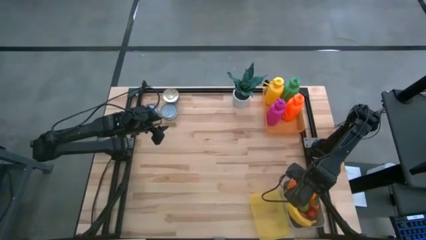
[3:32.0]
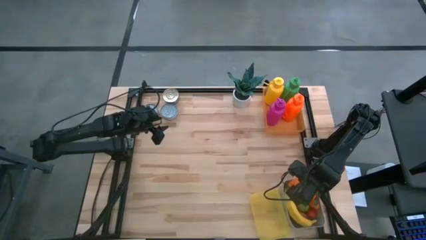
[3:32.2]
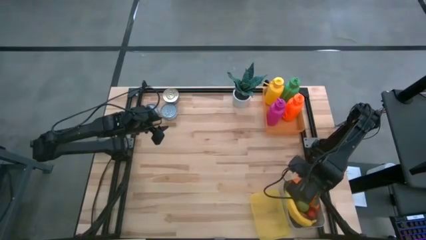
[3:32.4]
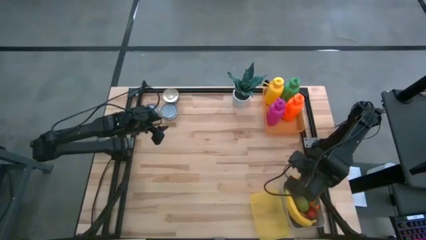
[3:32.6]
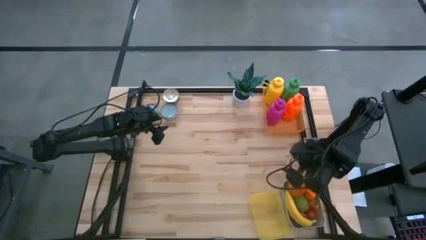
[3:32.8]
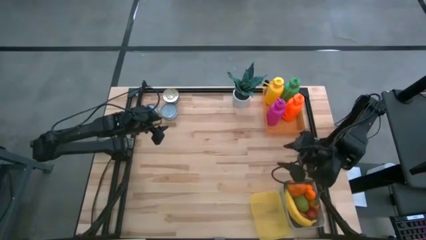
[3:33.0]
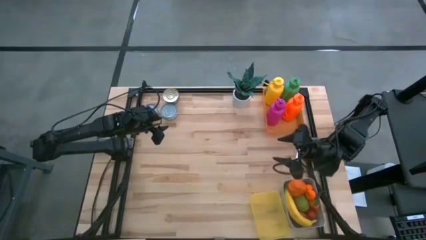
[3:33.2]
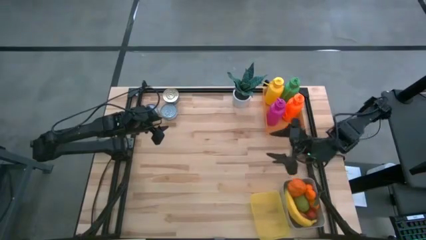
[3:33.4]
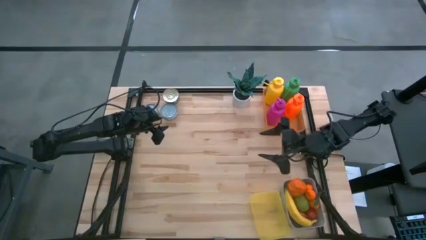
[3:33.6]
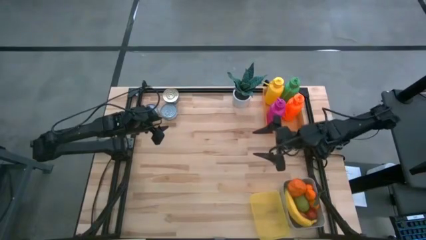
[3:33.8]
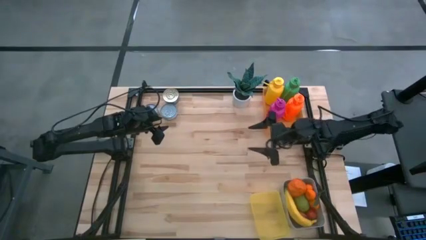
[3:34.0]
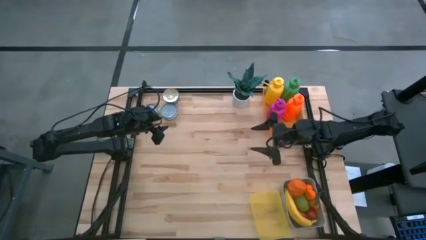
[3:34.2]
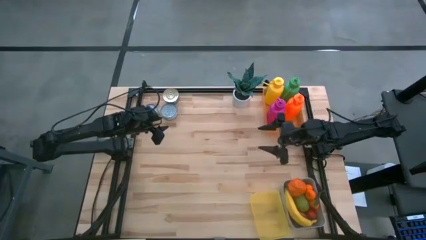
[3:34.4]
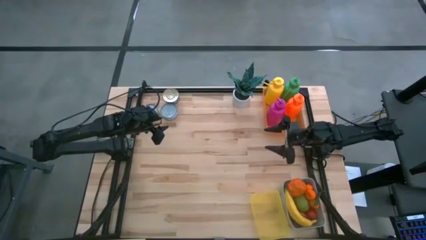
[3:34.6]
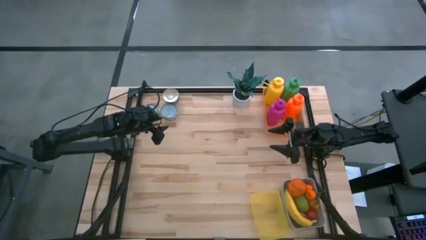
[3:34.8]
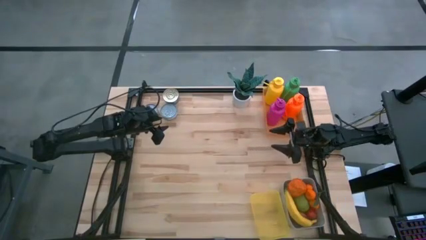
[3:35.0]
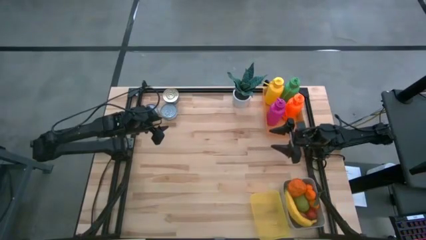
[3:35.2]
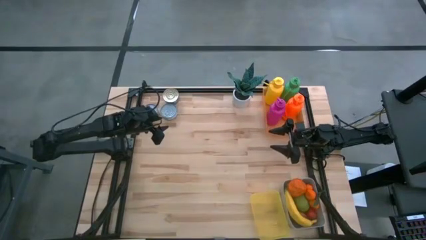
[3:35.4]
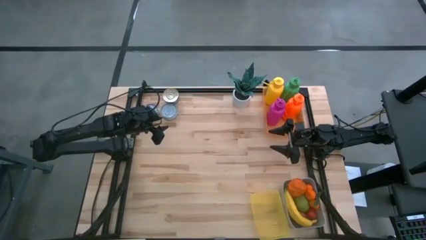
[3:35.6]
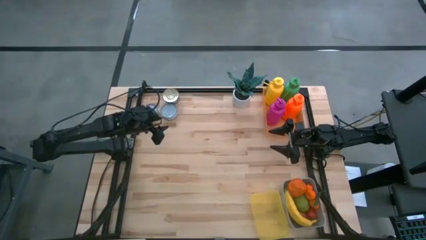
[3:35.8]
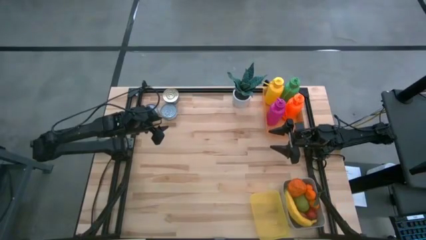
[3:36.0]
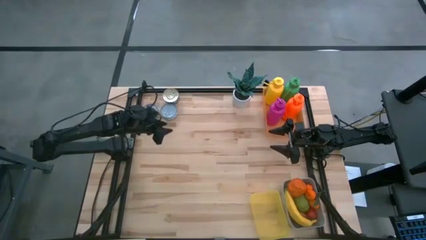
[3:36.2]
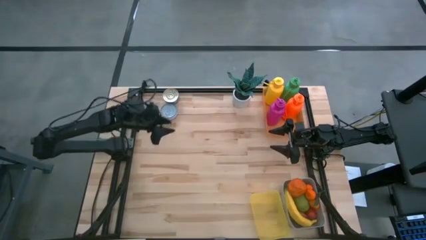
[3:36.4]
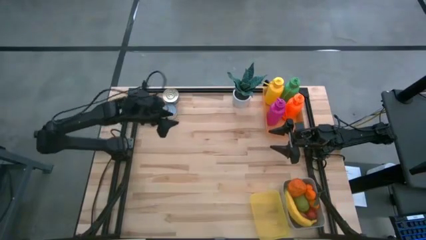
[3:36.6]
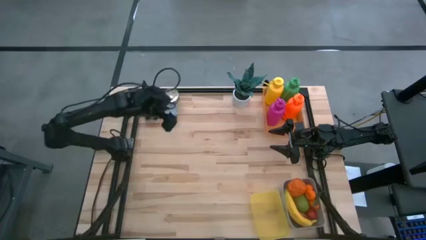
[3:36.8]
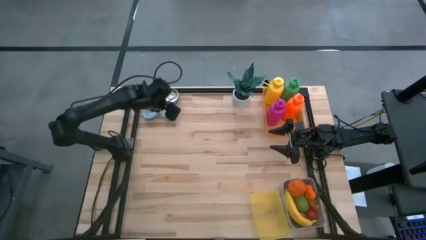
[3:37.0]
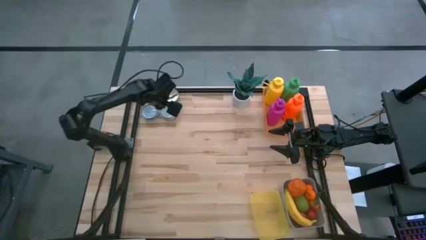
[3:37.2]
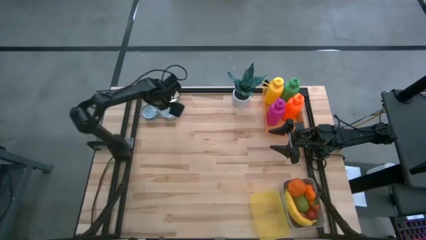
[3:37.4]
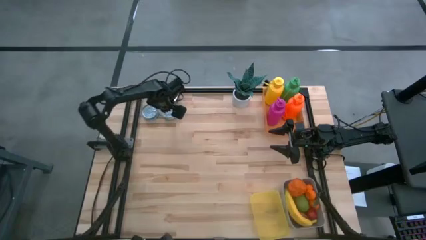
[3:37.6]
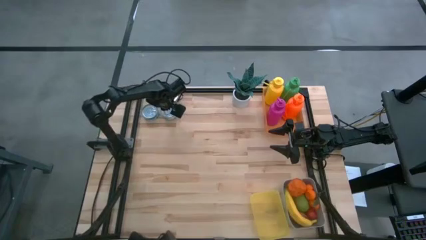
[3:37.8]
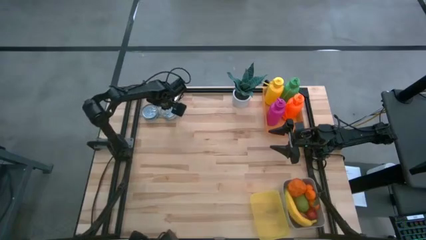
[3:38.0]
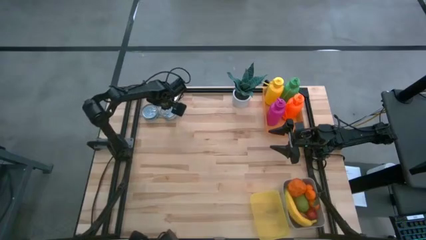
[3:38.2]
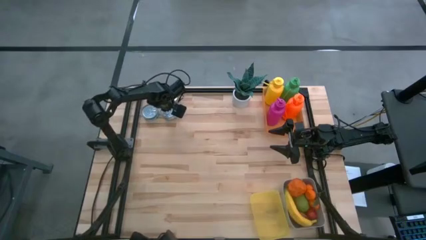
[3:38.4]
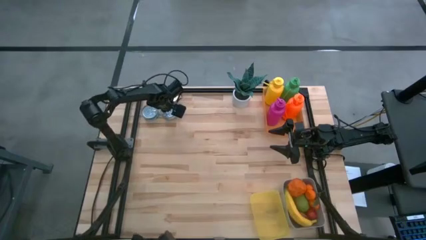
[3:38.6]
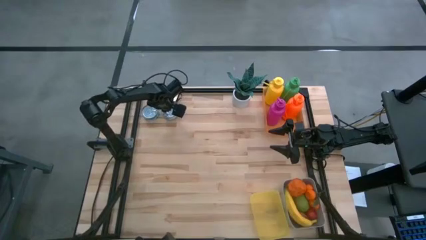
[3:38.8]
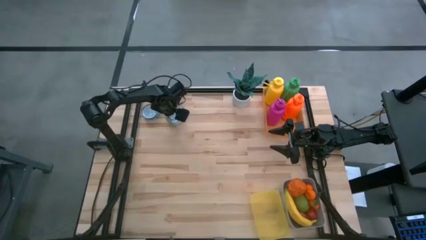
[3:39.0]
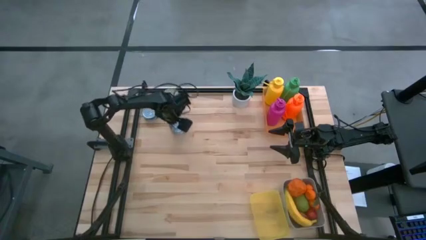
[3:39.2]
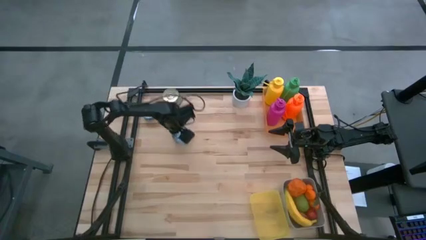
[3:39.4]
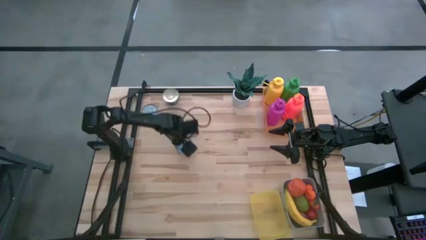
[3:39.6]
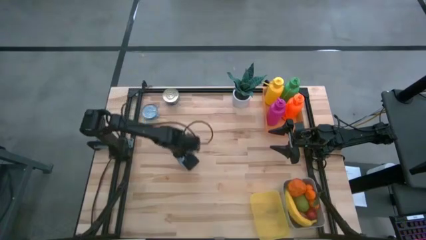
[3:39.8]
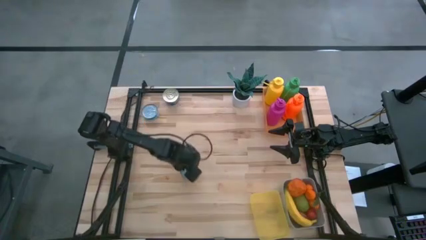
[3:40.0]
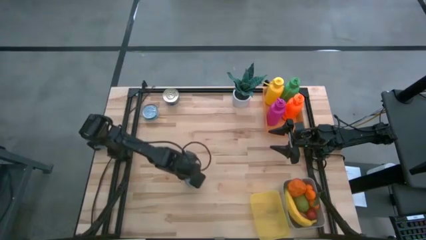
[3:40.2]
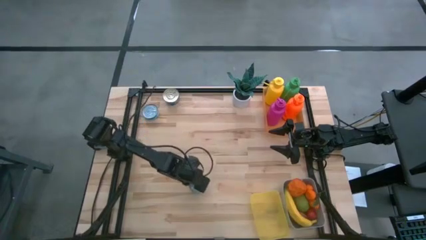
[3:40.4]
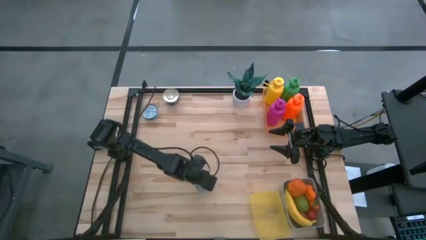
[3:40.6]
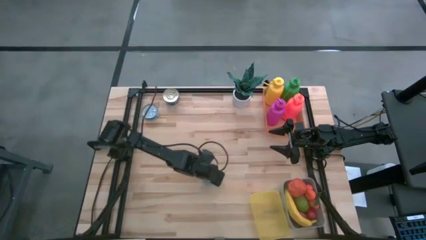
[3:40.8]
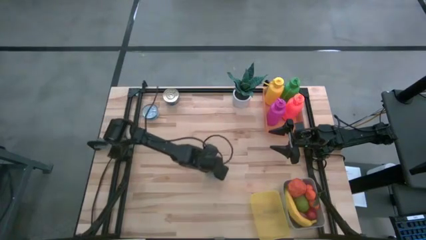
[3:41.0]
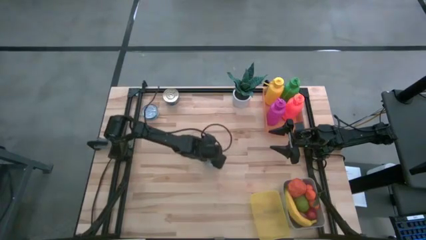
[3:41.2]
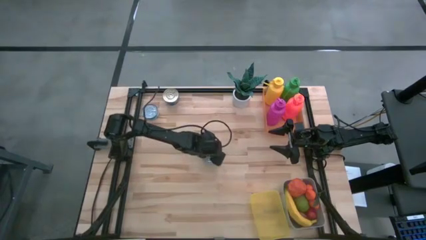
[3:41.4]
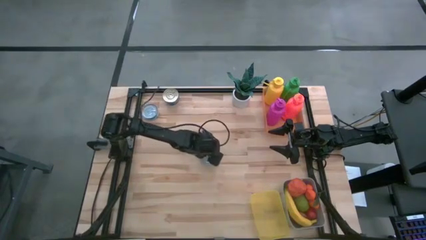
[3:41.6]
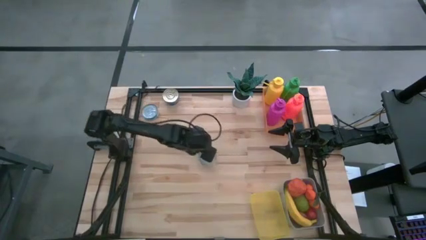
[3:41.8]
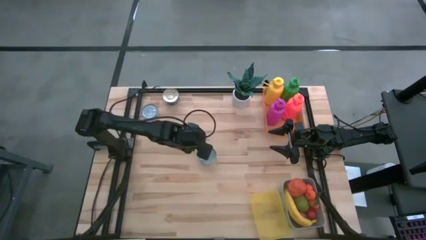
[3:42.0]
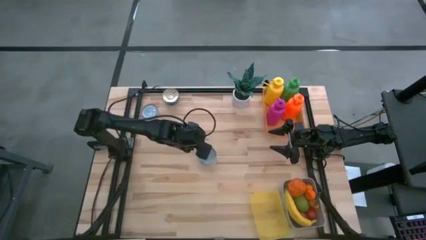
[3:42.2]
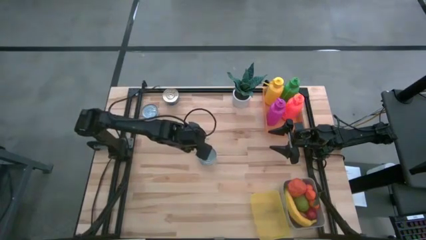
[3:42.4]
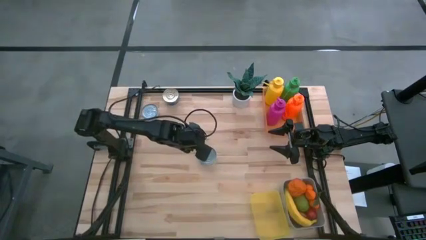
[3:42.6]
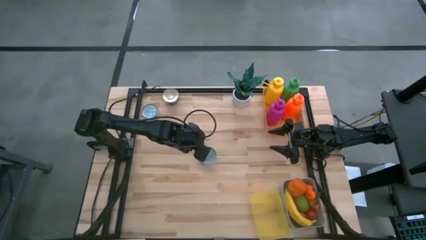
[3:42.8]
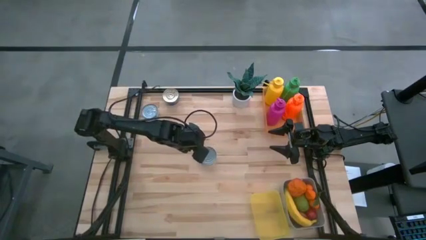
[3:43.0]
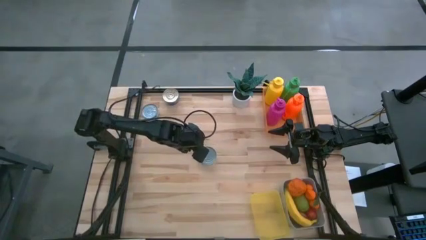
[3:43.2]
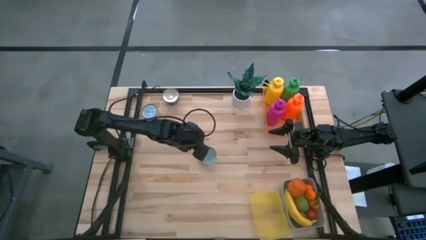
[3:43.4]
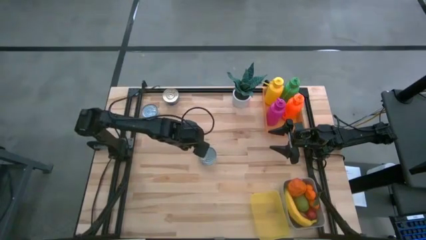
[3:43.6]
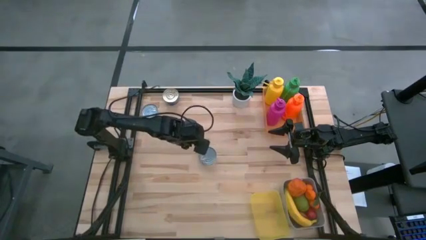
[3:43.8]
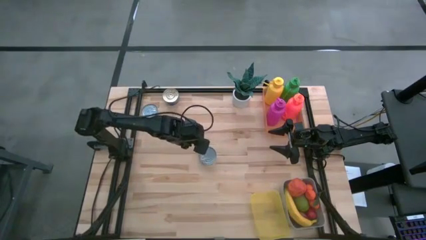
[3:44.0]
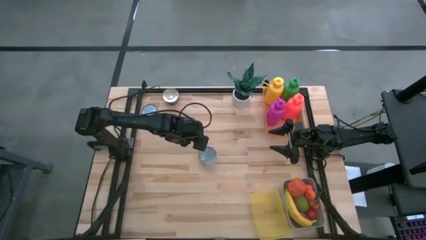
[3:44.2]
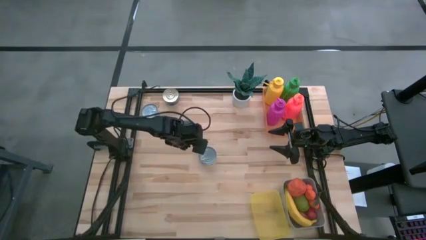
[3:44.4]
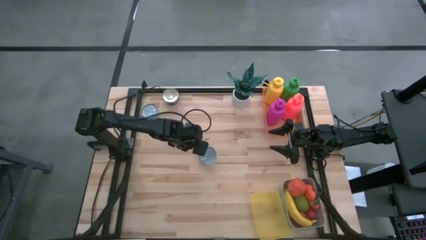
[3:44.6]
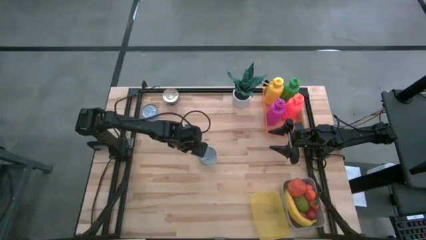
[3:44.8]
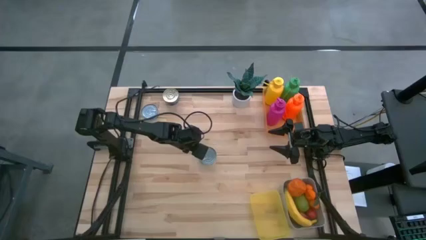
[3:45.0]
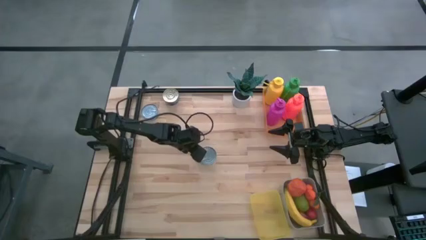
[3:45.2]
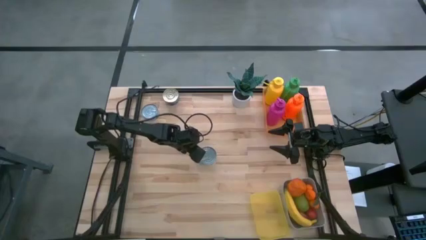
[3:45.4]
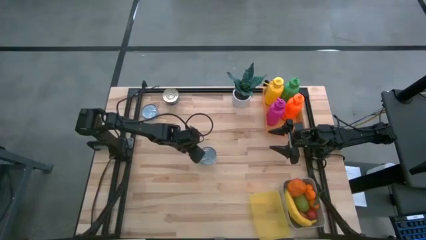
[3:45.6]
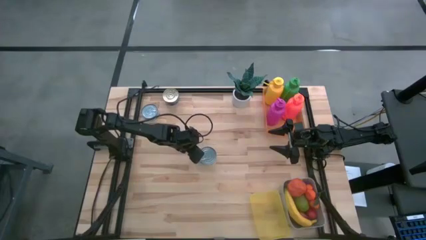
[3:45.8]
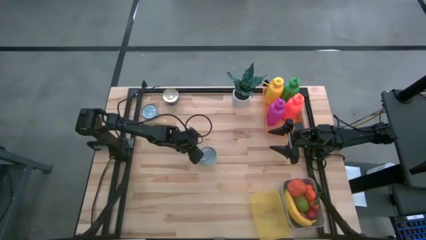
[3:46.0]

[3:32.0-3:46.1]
Task: Pick & Place Food Item
Put the blue tuna can into the yellow bin
